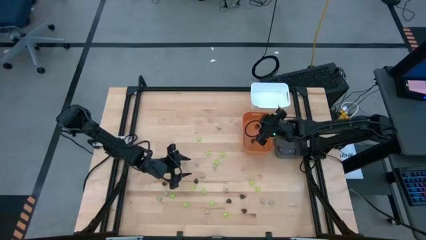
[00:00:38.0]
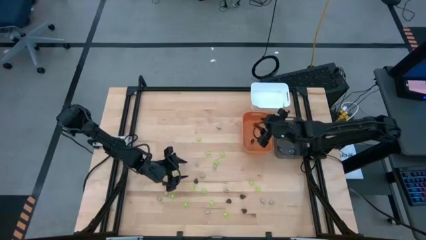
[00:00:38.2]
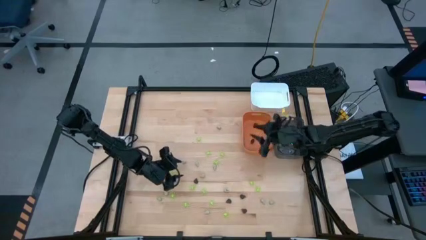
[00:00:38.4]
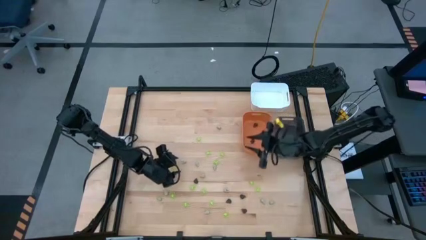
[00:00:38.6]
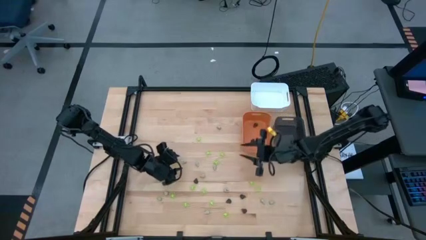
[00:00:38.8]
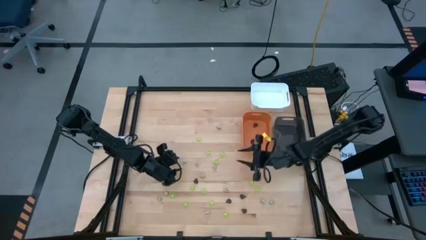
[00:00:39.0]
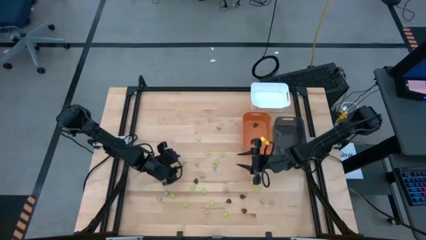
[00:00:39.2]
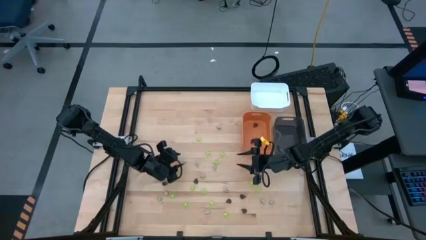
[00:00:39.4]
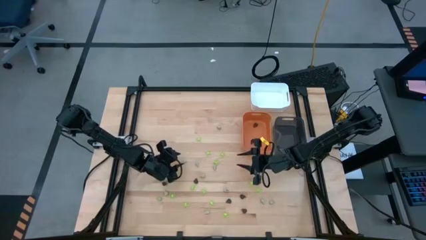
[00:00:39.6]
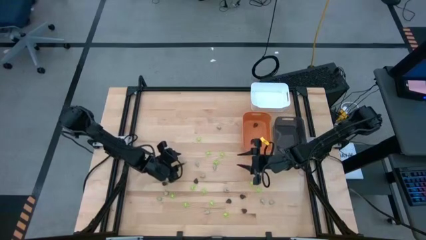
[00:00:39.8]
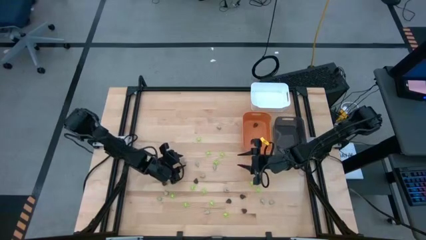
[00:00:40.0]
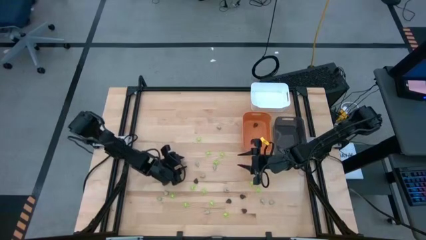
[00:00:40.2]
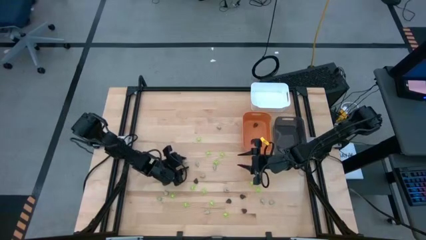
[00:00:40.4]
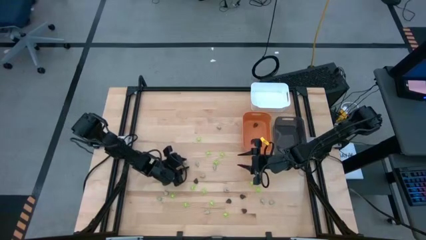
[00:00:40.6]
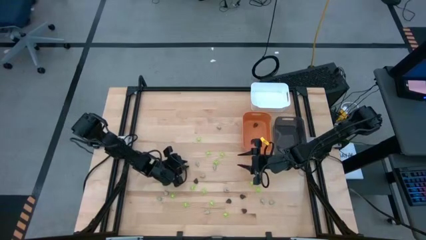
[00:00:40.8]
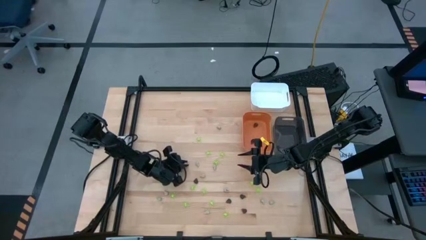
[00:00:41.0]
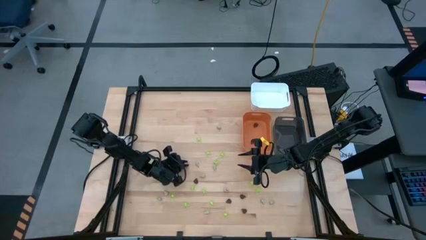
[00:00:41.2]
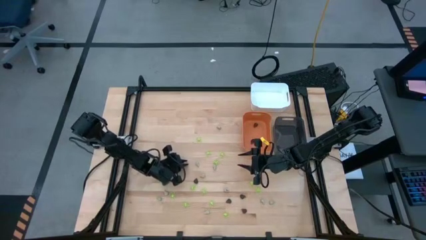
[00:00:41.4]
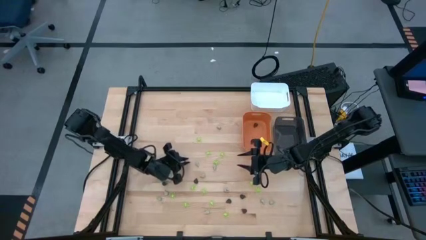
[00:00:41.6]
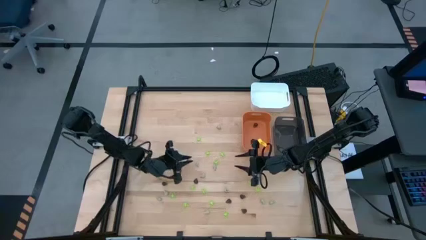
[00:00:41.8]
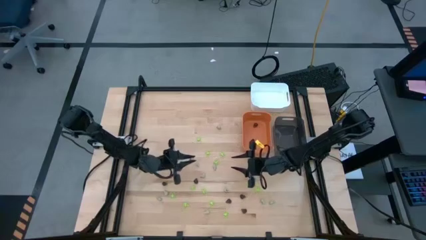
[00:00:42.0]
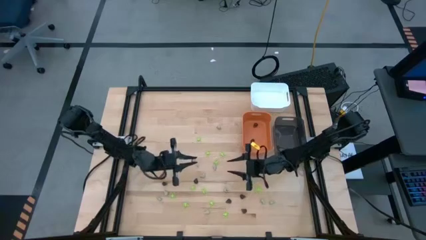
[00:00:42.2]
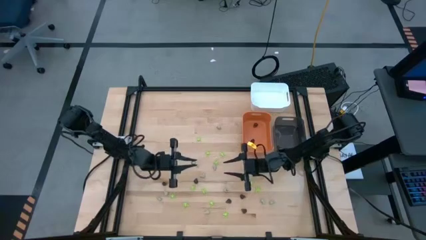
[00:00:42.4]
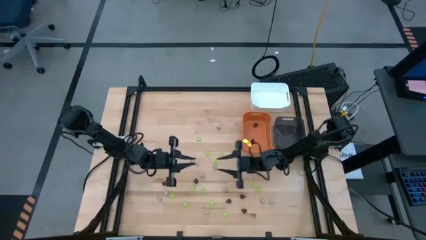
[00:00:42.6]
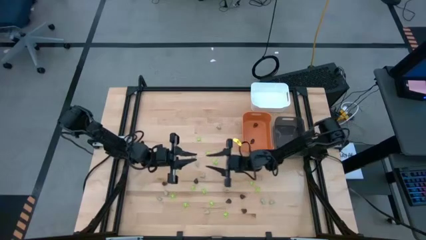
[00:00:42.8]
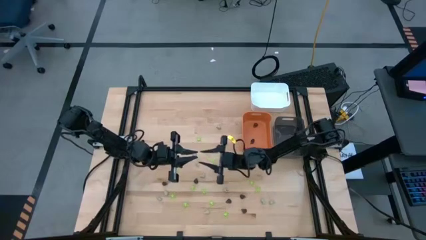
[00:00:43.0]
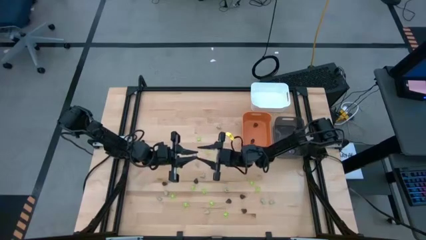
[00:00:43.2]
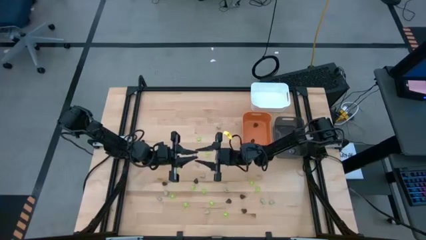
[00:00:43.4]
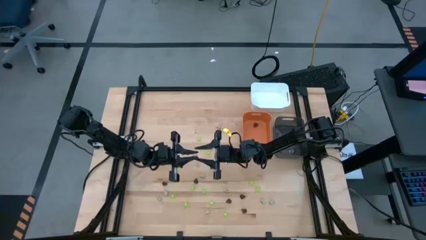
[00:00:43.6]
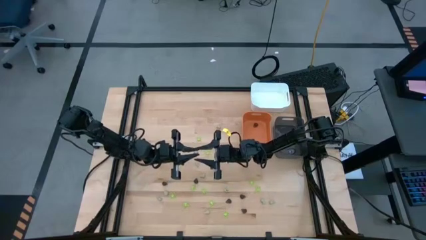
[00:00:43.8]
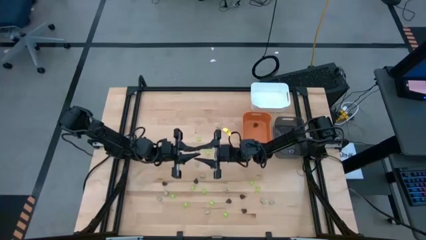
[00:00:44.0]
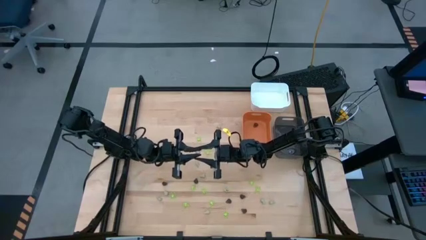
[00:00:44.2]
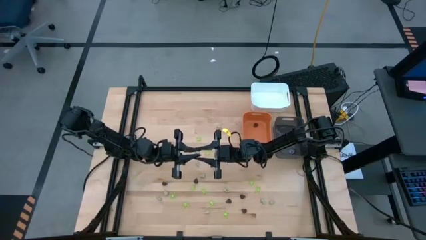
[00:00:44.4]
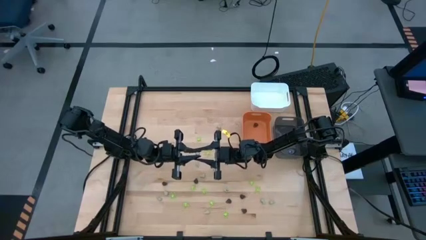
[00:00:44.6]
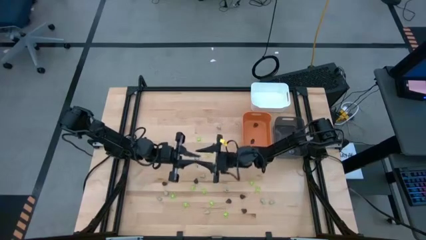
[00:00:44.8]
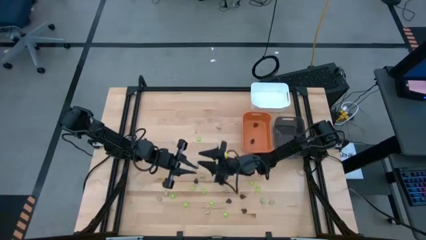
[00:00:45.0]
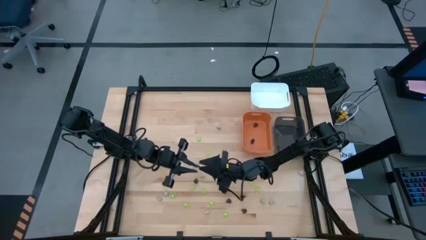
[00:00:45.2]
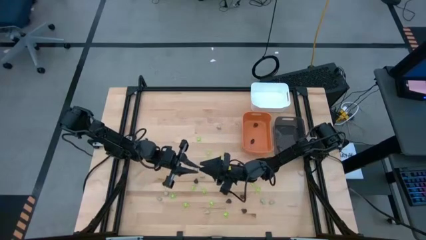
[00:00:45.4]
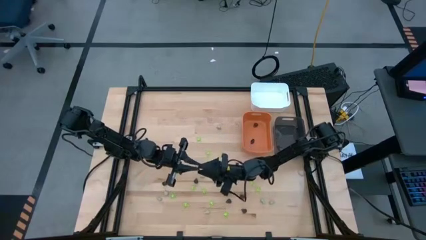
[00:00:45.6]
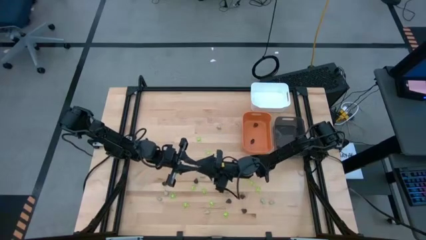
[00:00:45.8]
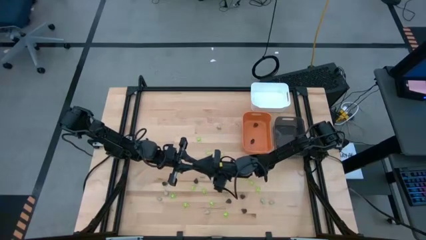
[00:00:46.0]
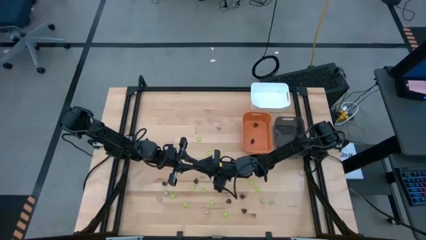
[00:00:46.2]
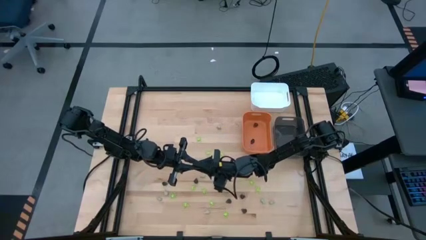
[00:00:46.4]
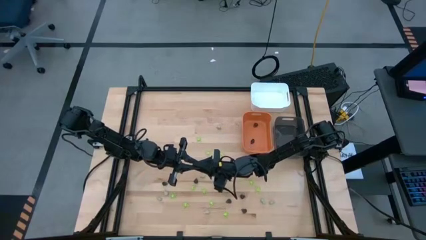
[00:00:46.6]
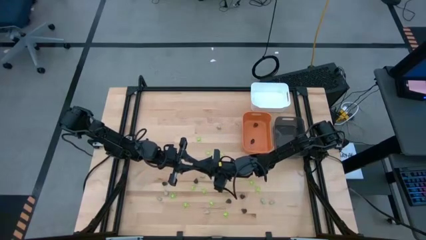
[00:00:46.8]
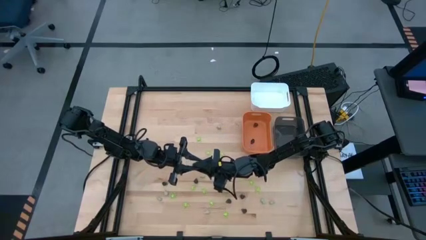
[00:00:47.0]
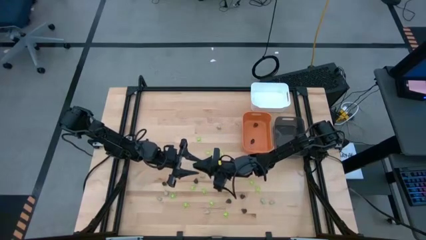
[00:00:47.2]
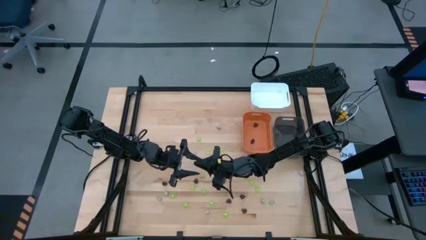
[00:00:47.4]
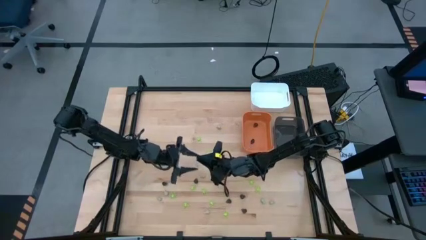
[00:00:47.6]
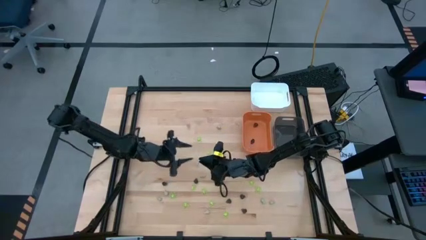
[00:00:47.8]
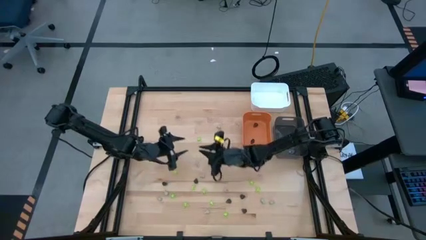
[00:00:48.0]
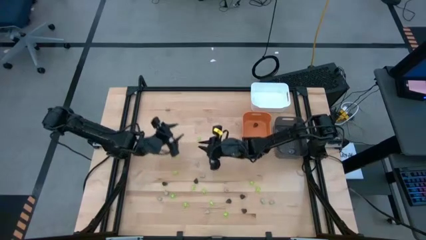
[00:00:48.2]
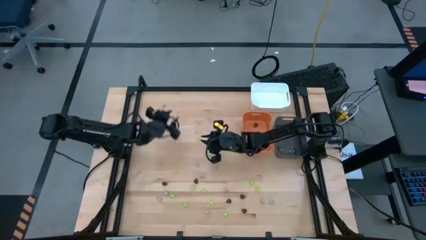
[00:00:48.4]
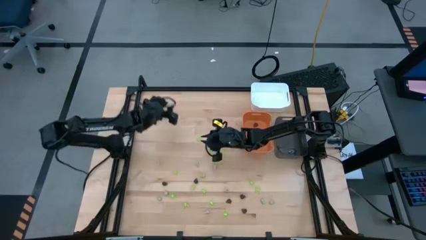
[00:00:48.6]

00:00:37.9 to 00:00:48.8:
Task: Sort Halloween decoration
Put the white skull toy into the black bin
